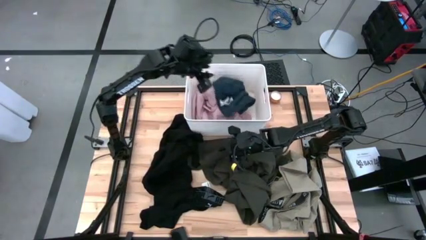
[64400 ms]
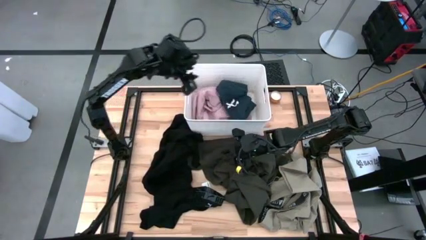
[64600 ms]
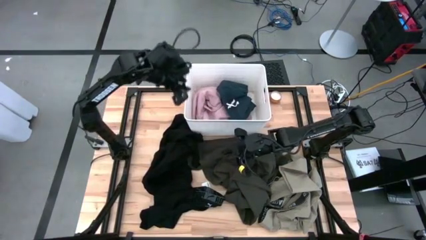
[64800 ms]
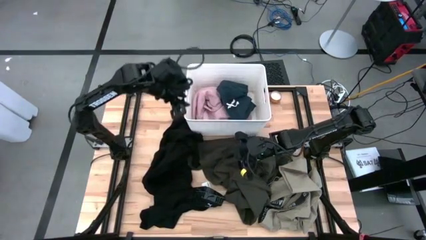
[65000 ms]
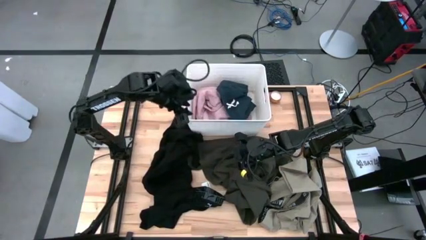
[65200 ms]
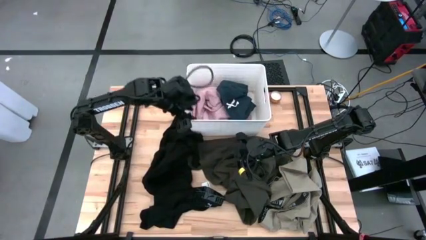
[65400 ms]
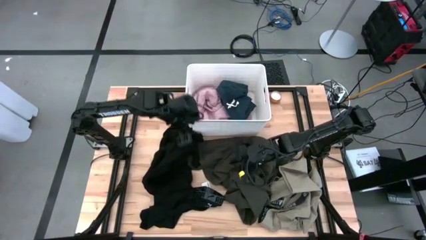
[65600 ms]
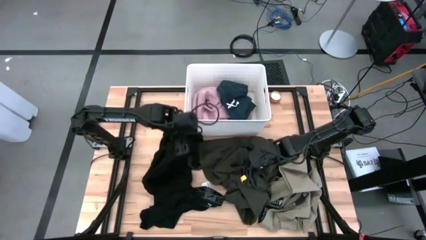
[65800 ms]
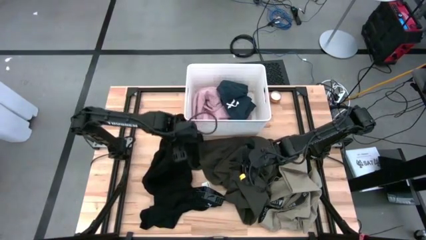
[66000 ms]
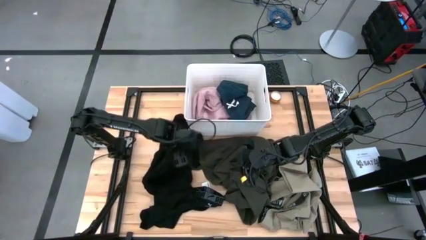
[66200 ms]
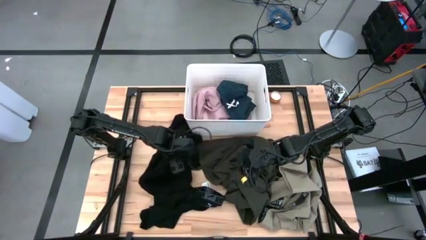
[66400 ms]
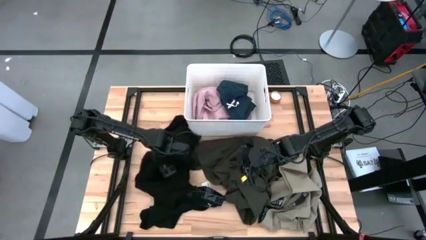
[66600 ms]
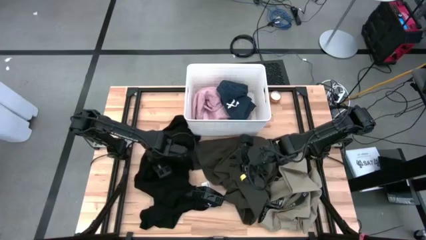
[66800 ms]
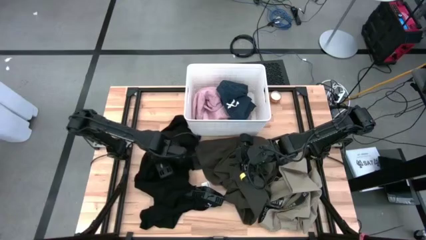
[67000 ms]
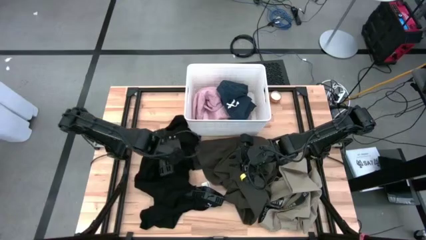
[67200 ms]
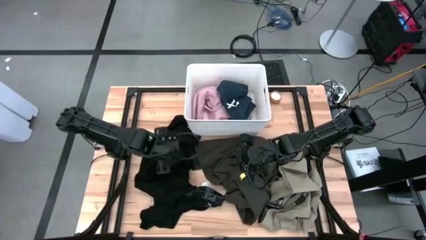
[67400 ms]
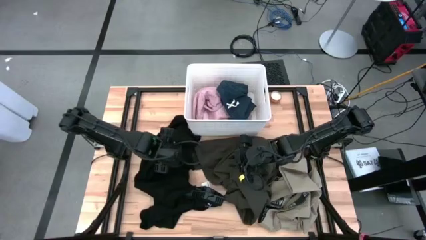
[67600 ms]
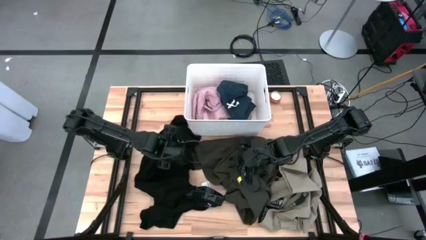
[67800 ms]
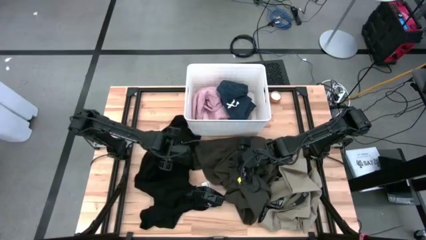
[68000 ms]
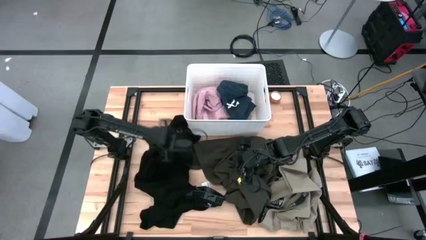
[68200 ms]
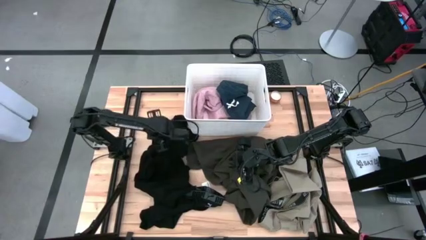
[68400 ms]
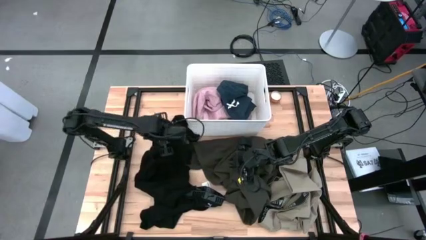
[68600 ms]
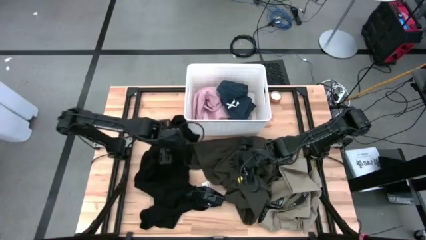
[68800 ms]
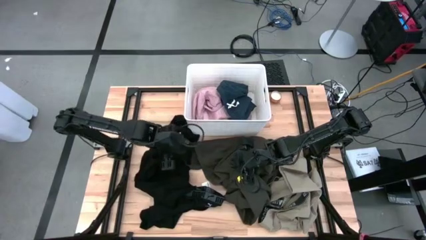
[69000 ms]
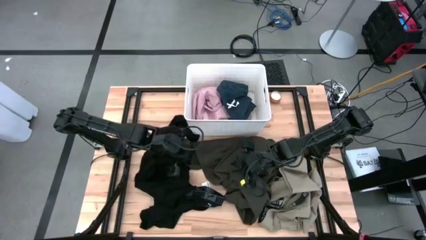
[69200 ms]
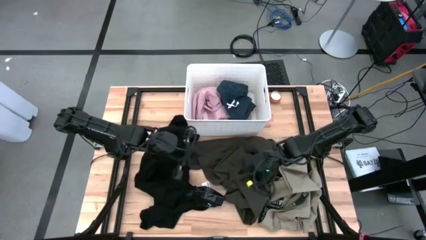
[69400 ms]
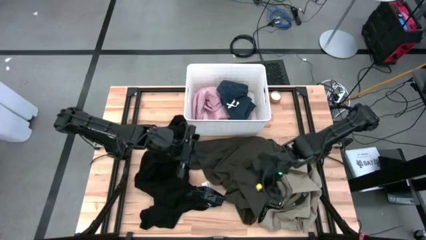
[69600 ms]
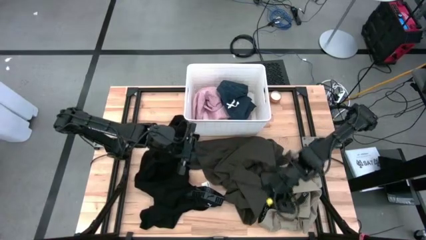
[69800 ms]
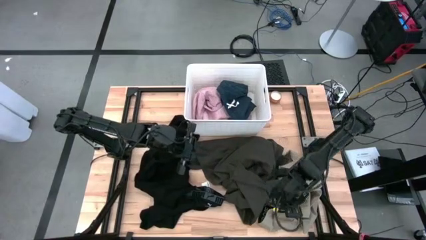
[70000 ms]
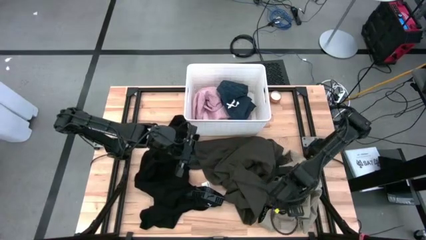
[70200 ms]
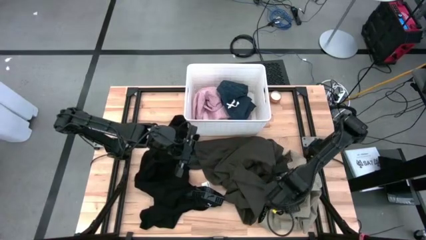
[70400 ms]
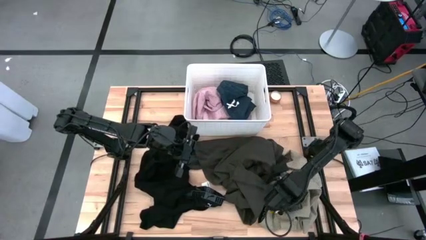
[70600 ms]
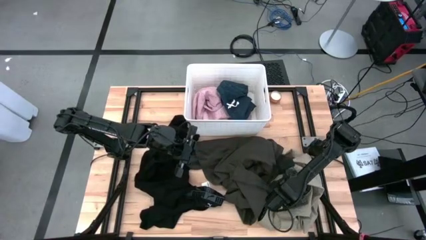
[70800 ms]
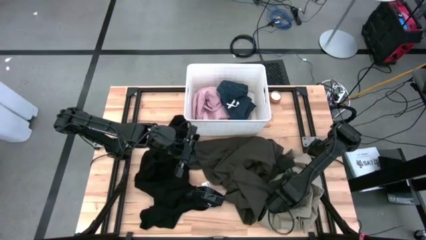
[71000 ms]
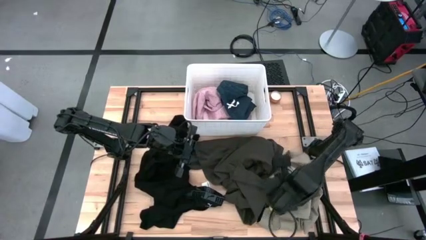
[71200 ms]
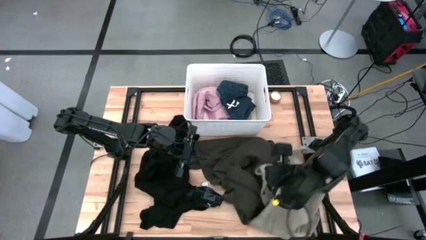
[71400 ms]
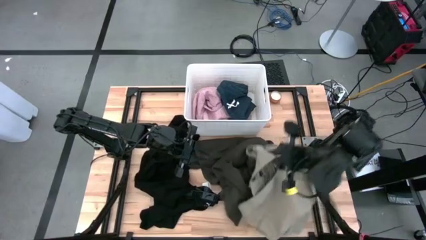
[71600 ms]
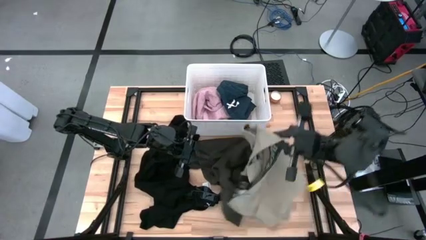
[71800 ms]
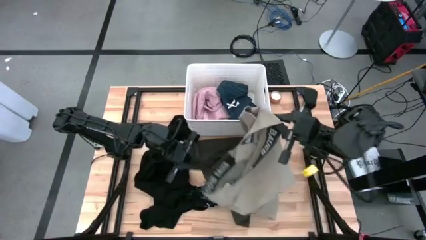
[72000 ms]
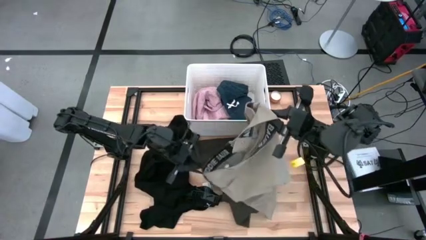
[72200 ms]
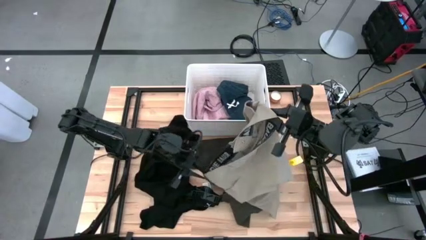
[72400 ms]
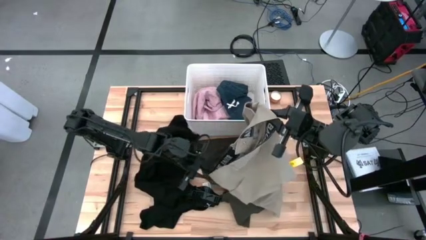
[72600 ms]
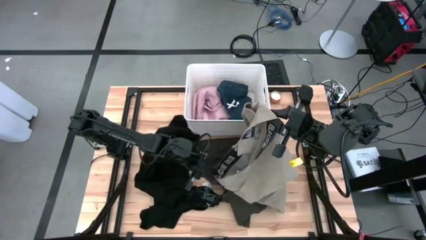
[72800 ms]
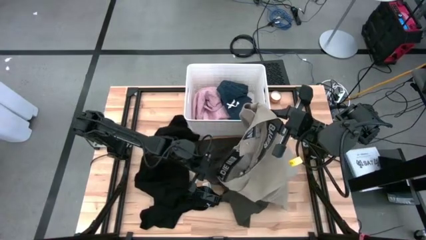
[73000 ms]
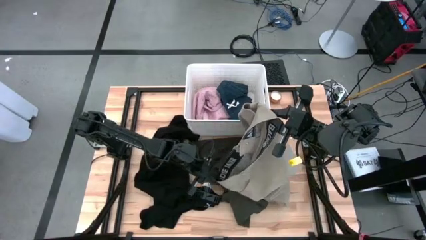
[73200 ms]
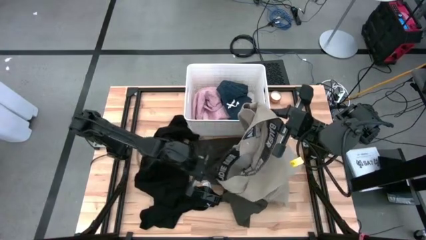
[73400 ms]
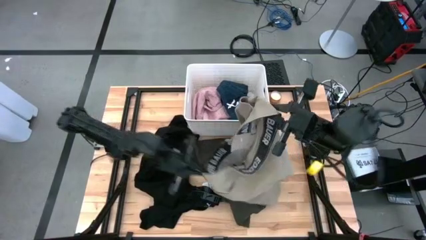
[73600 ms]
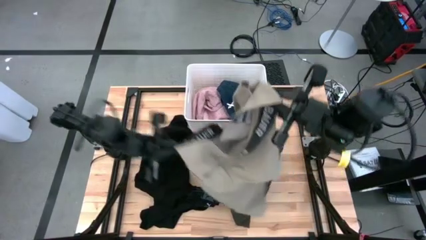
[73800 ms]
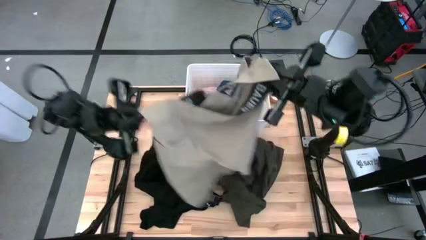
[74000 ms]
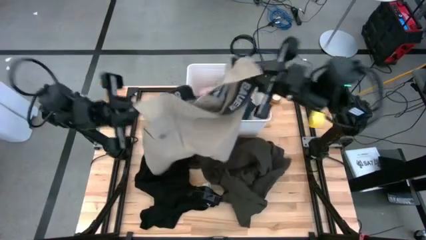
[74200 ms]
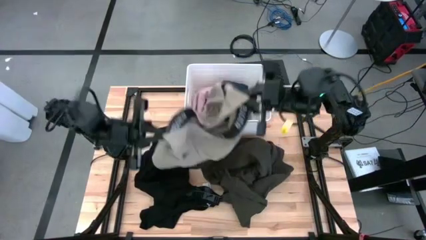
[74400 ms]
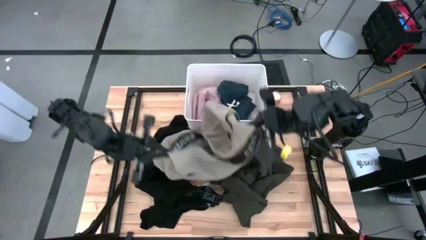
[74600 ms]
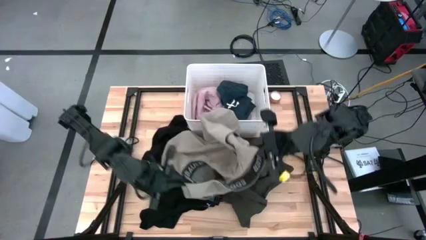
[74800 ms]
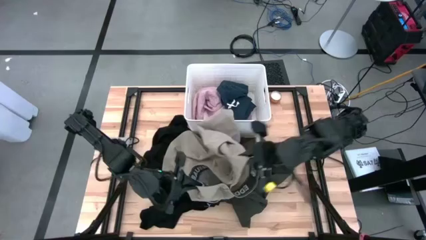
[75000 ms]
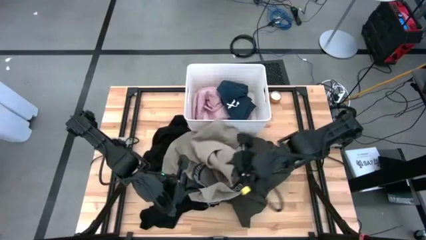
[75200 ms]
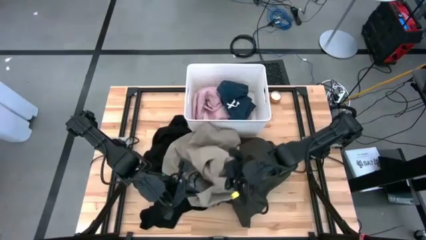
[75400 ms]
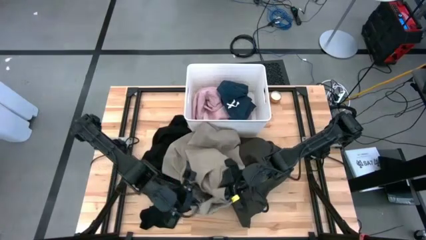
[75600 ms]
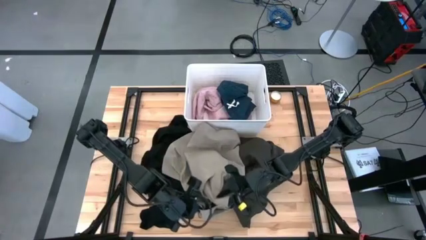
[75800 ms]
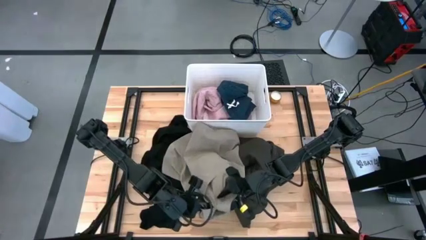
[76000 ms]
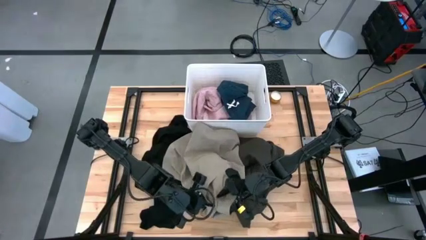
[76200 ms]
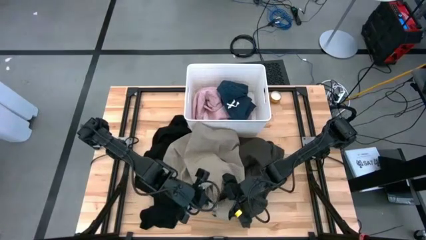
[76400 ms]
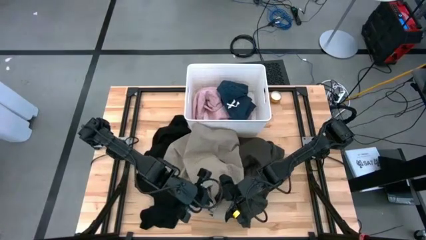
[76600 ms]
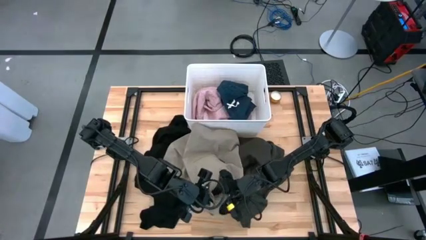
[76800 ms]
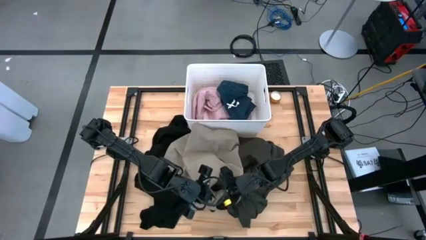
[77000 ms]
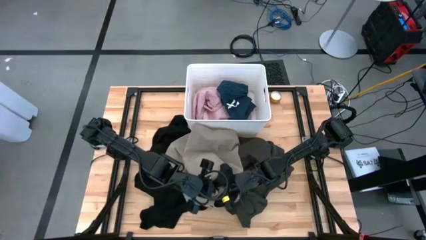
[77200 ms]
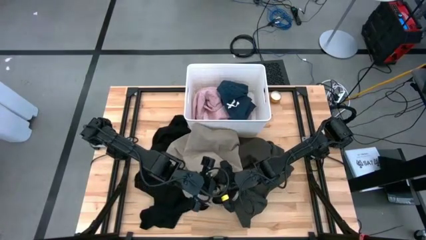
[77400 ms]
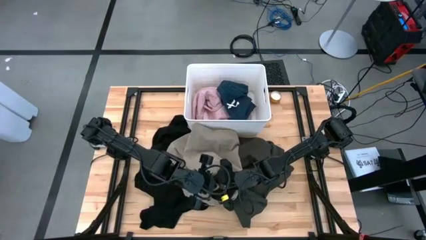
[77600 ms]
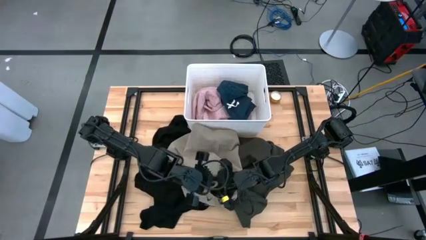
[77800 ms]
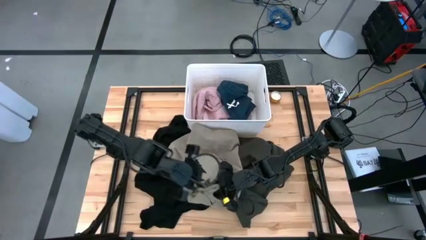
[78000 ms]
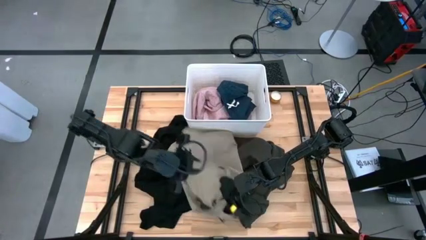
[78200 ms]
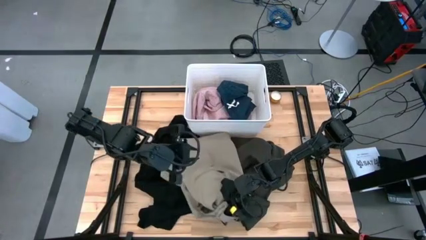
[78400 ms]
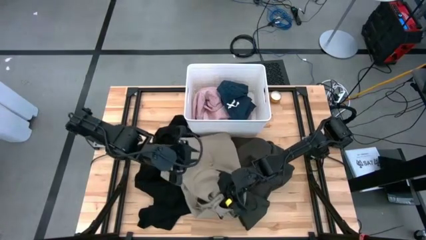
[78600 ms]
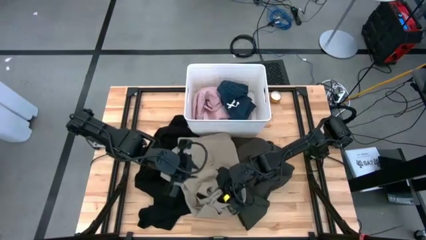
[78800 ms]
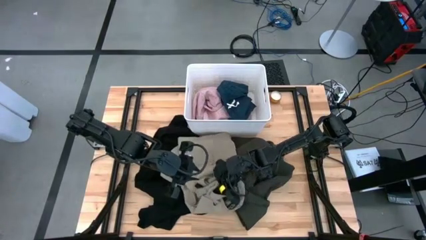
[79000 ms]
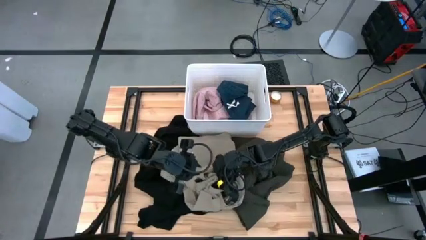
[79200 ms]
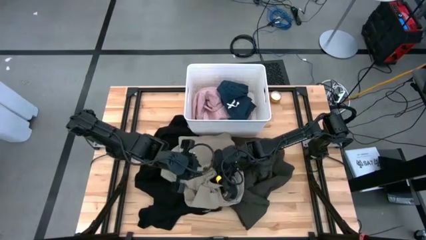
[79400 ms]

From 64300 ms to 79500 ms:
Task: Sort clothes
Put the brown shorts into the white bin

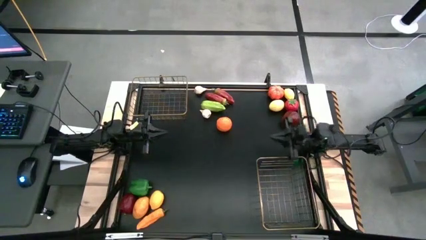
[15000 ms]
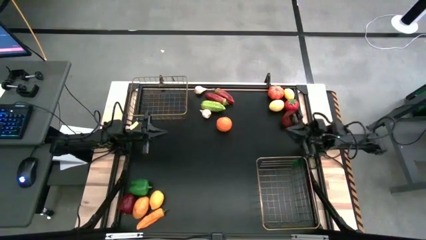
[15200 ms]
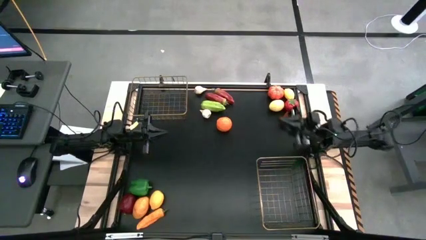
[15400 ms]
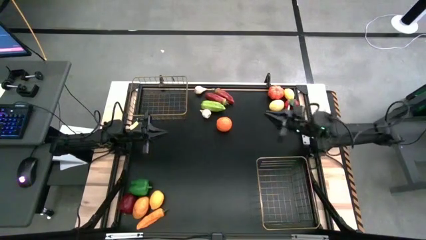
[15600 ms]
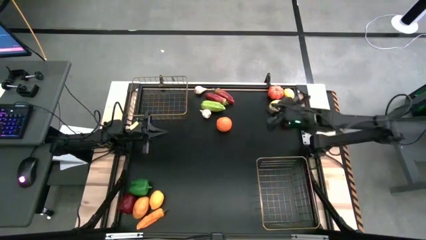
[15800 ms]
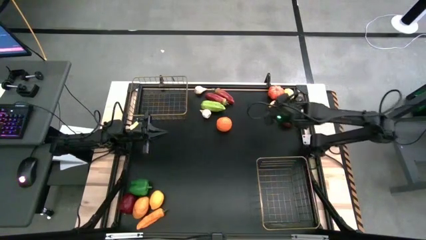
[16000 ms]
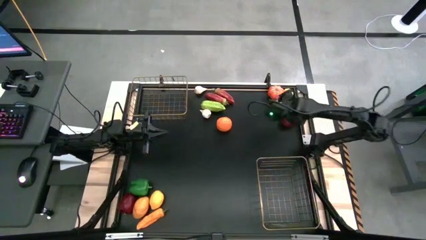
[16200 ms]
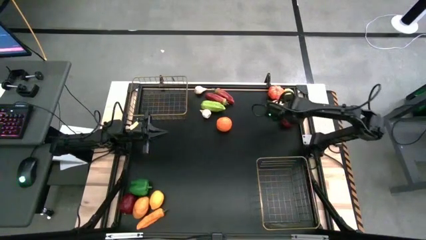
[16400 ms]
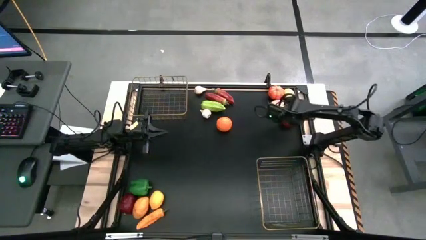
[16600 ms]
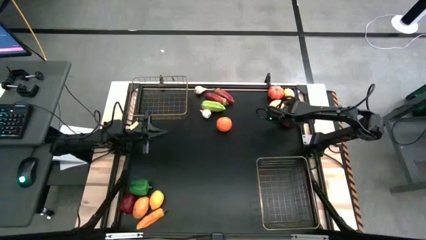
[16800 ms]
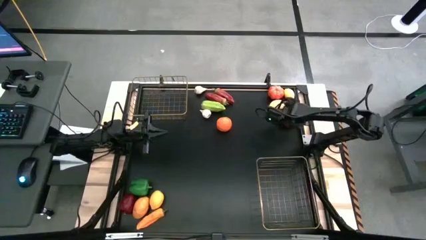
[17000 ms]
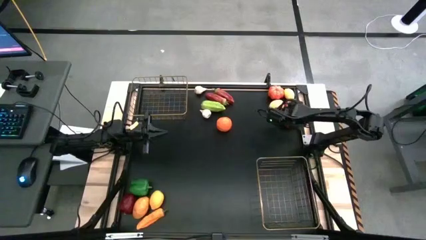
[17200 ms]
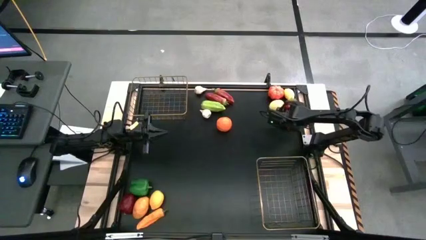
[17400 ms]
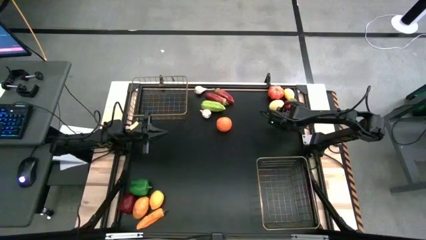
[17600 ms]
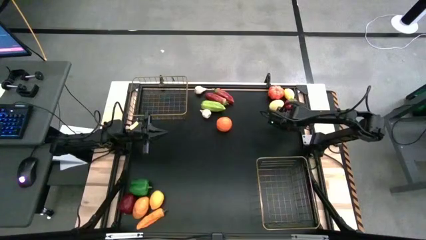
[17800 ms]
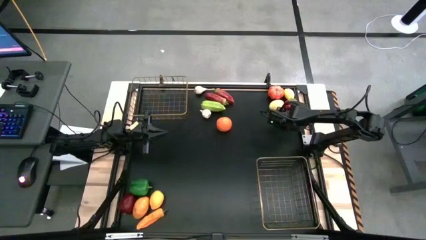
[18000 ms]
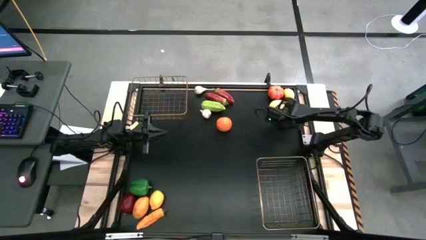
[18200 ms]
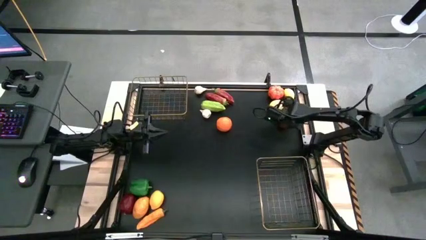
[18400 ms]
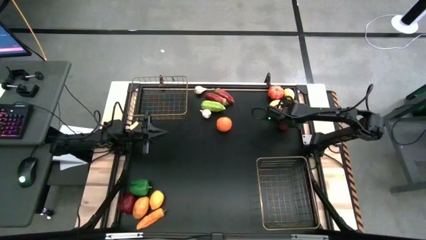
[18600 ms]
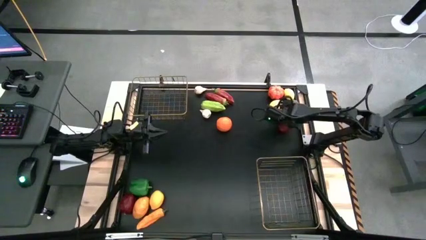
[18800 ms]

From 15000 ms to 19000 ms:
Task: Sort produce into baskets
Put the top red apple into the bottom wire basket
